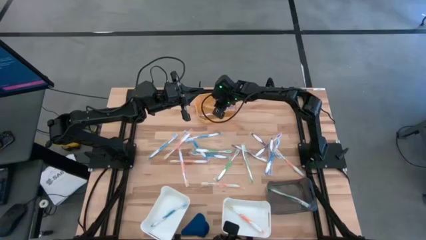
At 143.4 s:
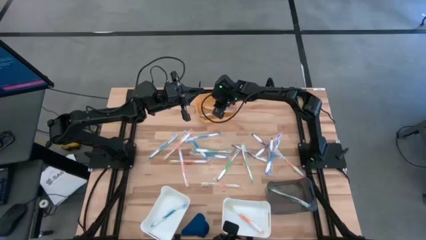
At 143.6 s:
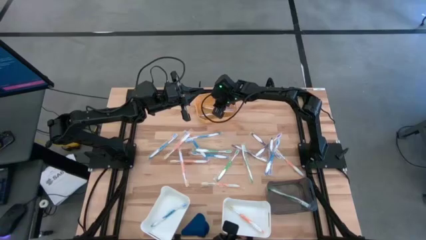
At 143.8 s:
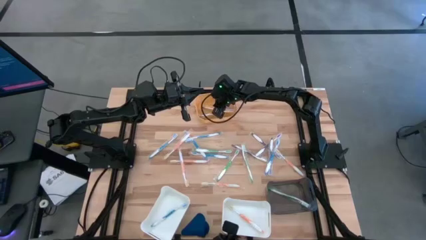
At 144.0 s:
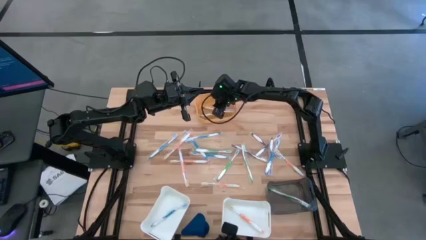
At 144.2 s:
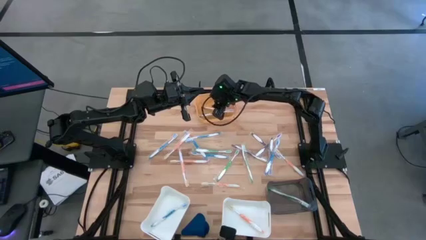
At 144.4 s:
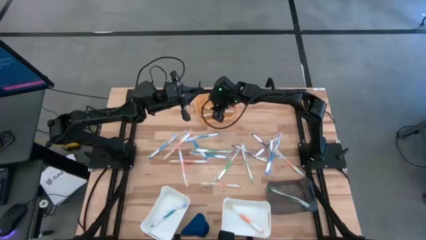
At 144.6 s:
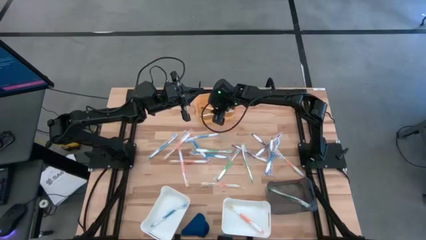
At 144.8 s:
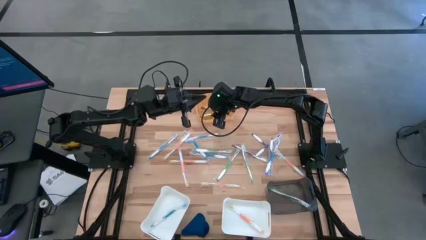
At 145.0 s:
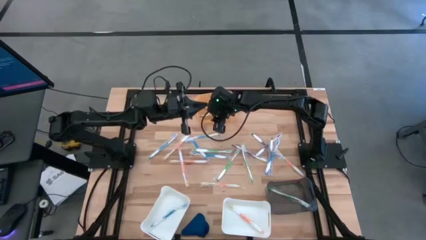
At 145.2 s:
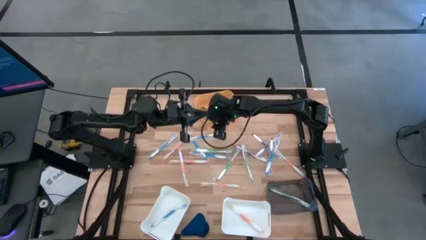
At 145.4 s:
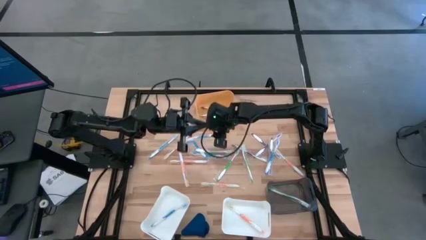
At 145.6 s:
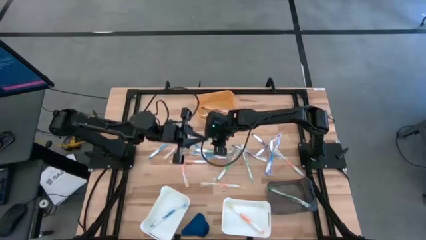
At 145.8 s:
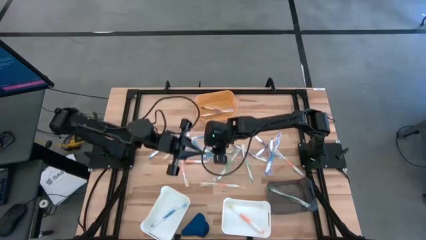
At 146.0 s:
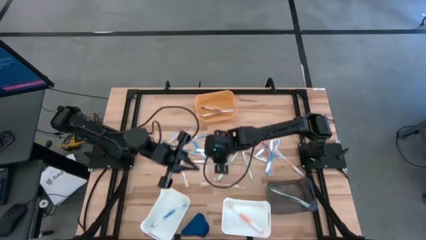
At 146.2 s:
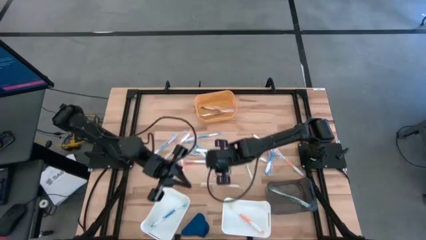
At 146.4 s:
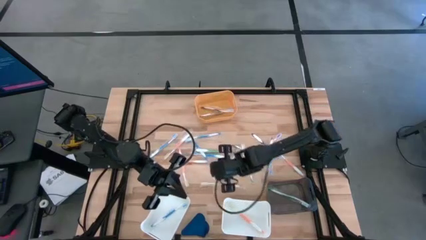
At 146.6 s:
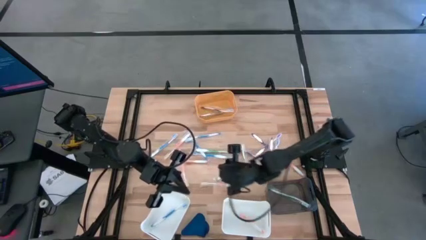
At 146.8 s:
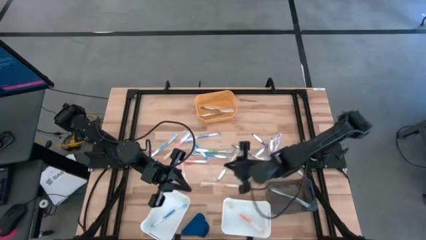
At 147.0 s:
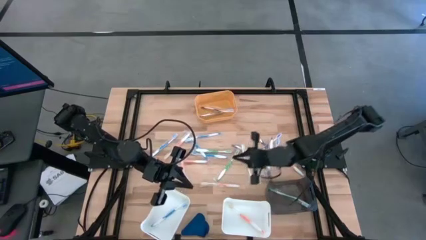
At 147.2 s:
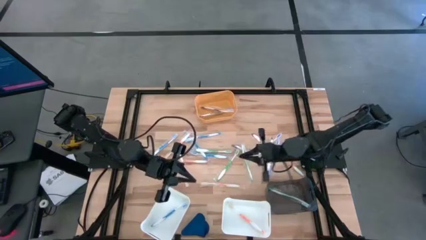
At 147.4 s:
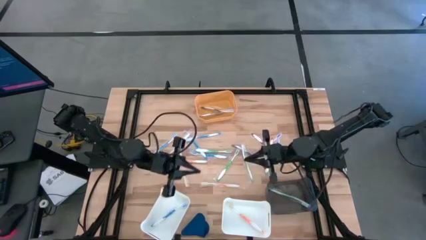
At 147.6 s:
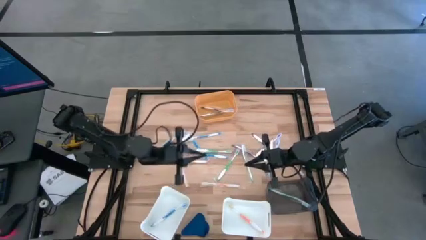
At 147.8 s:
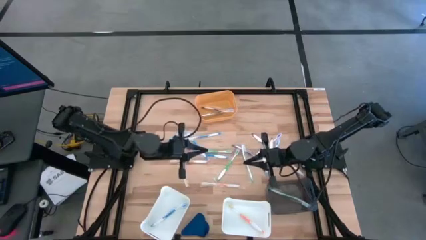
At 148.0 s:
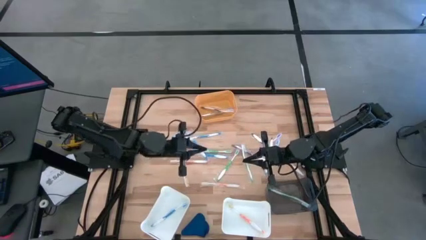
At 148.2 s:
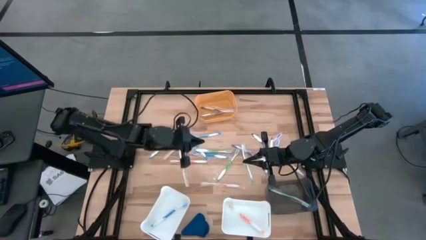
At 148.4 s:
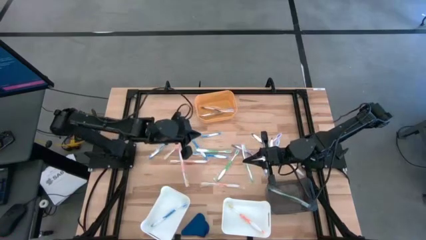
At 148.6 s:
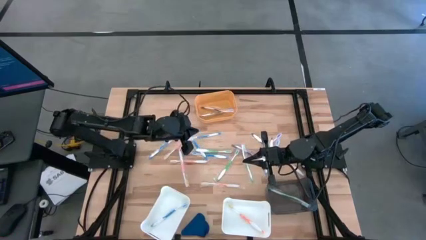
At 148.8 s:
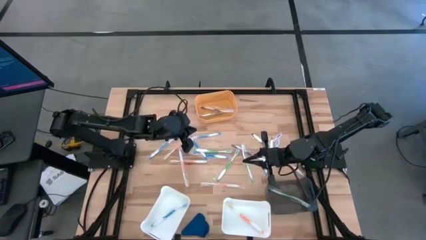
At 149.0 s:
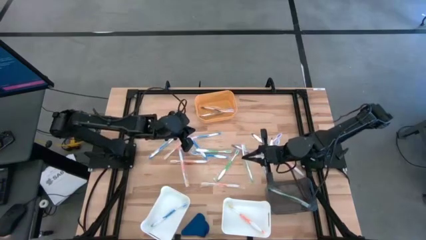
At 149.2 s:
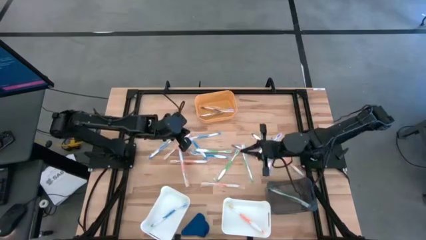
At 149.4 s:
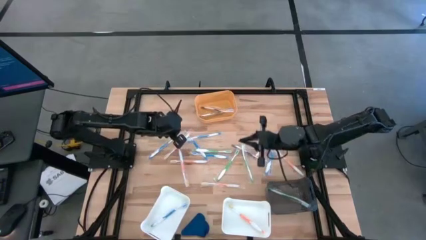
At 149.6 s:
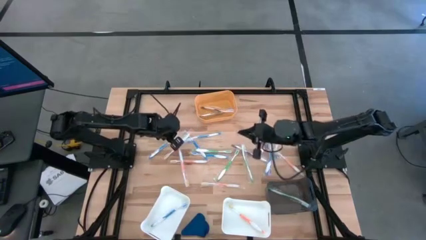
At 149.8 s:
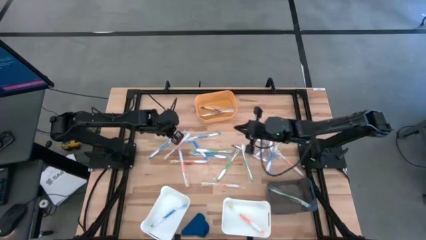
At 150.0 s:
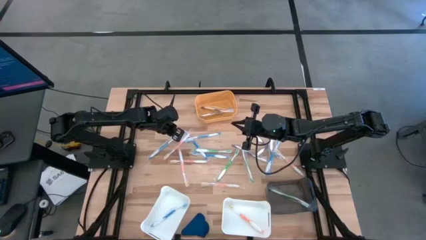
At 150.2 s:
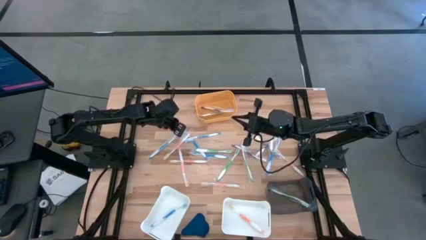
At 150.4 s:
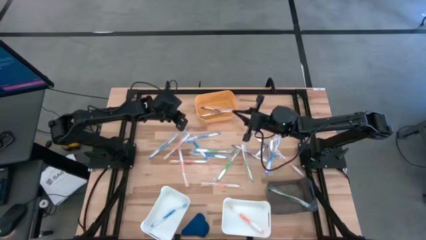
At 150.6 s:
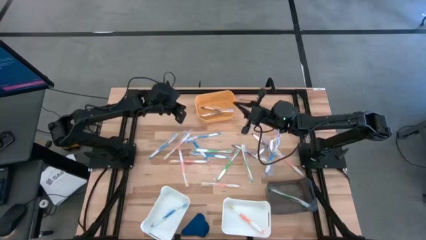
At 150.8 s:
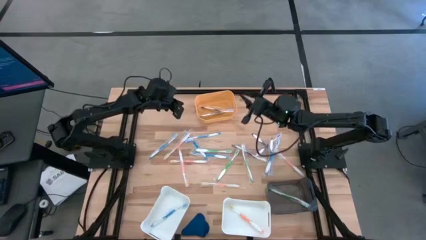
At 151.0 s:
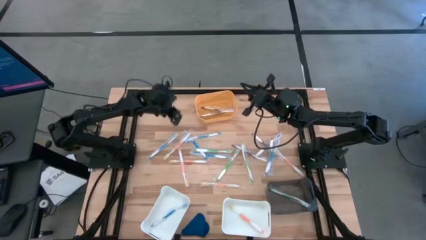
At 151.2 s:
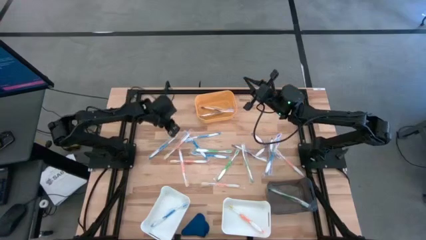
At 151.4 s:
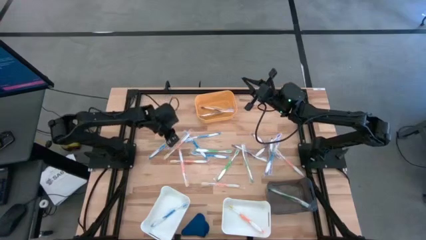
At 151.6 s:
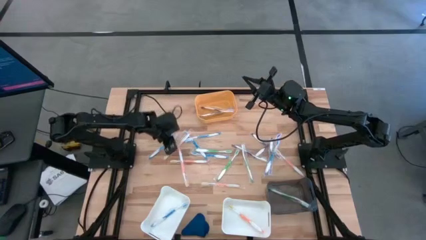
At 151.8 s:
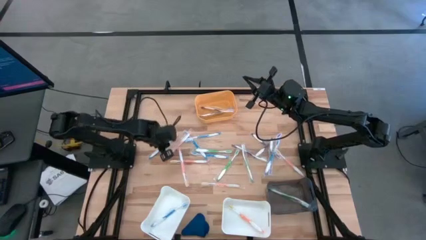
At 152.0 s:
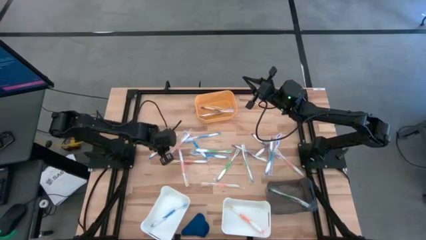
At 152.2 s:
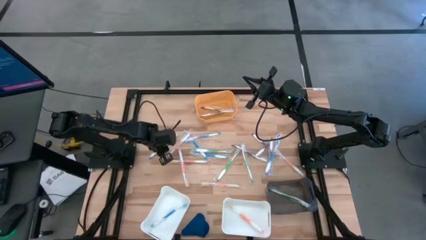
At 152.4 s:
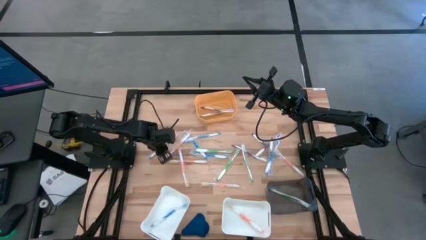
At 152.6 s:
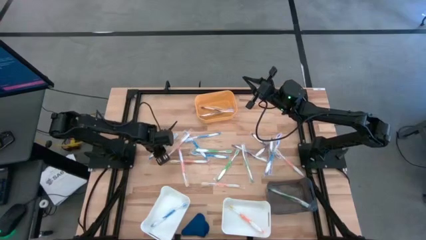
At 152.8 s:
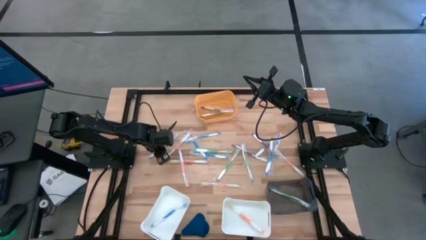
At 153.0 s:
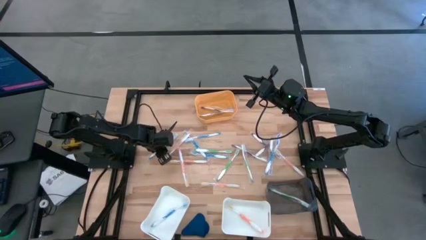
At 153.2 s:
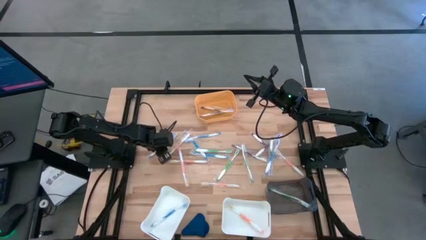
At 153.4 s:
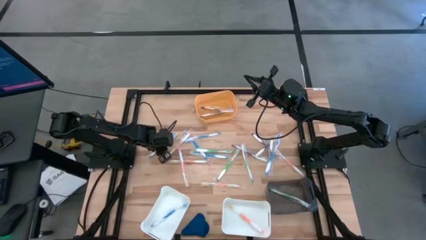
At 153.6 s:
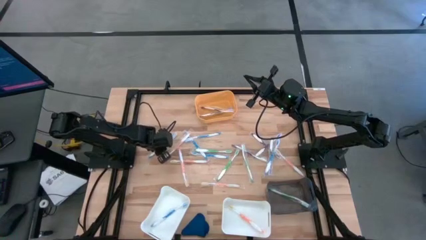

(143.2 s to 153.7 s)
Task: Pick & Place Toothbrushes
Put the blue toothbrush into the left white bin

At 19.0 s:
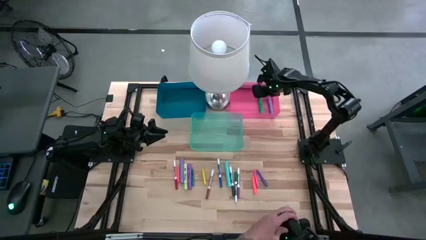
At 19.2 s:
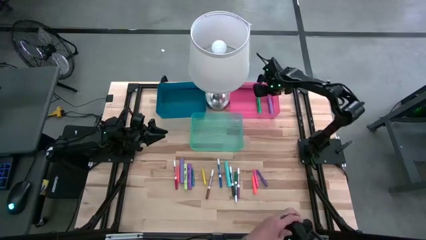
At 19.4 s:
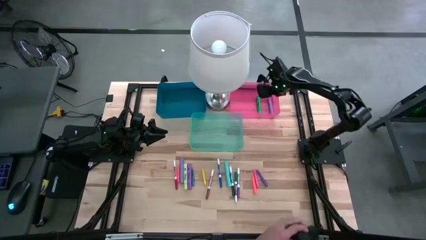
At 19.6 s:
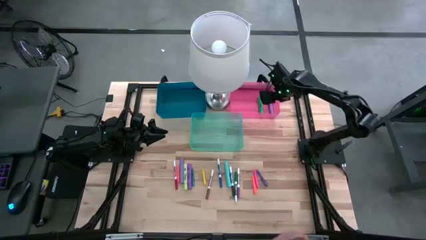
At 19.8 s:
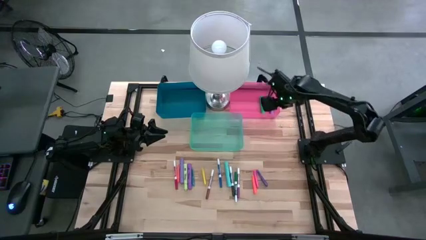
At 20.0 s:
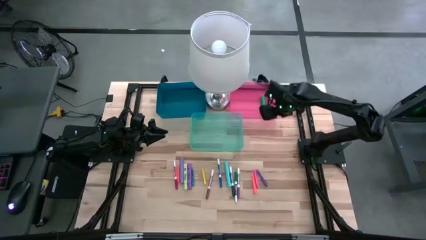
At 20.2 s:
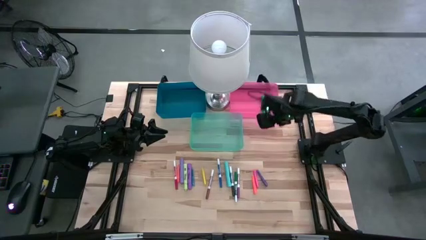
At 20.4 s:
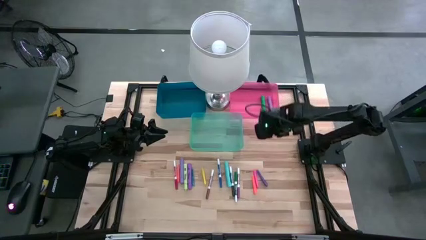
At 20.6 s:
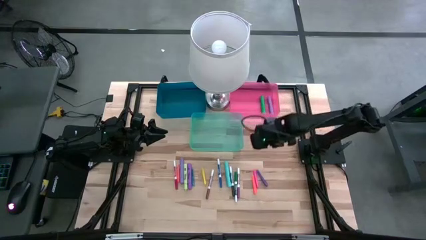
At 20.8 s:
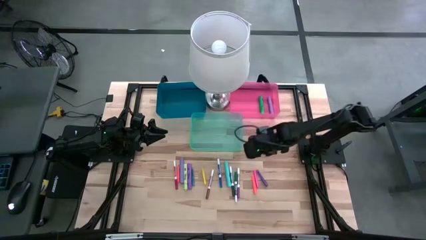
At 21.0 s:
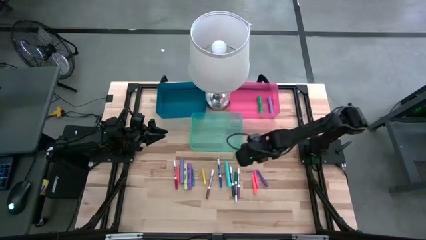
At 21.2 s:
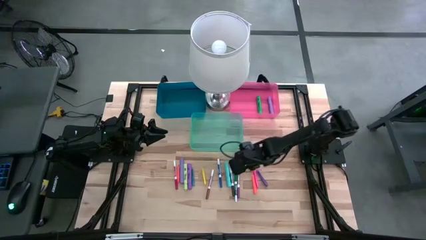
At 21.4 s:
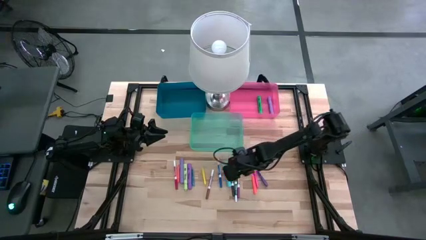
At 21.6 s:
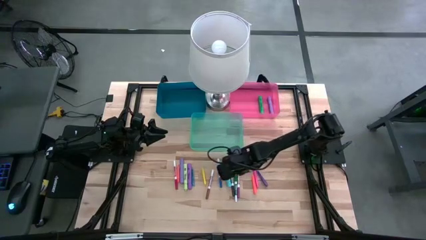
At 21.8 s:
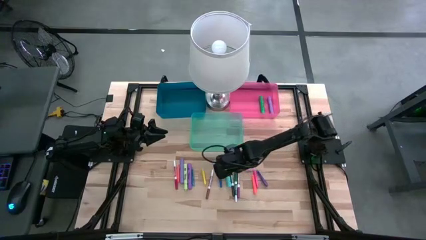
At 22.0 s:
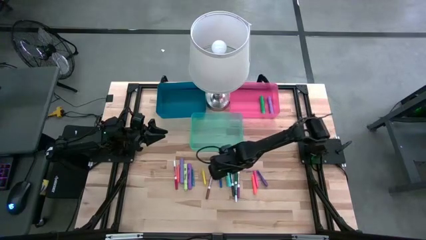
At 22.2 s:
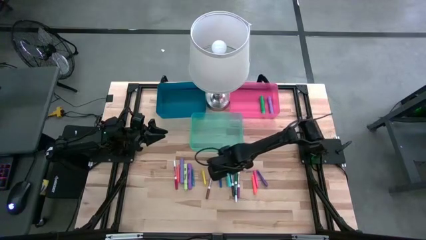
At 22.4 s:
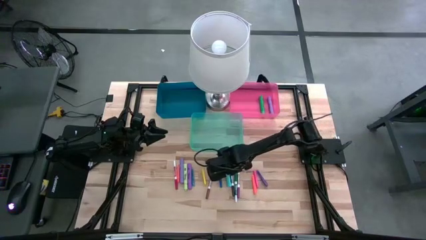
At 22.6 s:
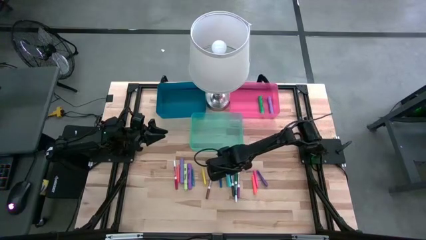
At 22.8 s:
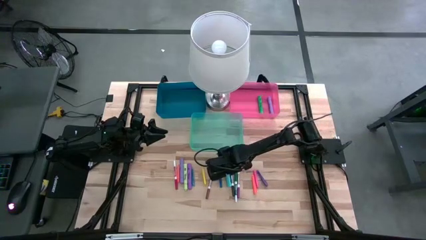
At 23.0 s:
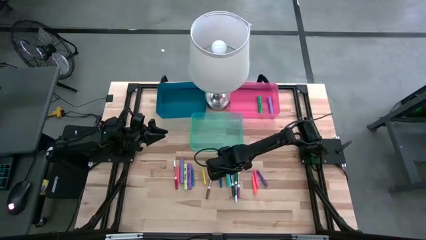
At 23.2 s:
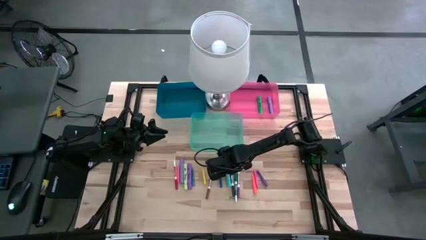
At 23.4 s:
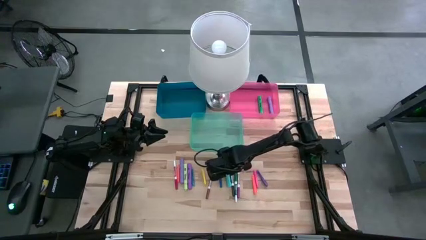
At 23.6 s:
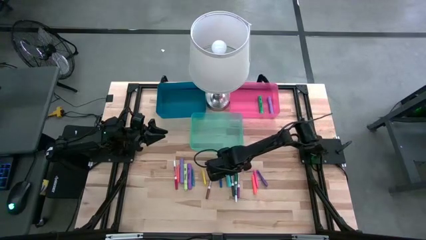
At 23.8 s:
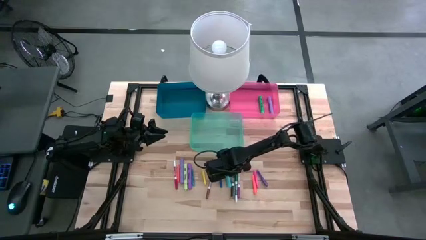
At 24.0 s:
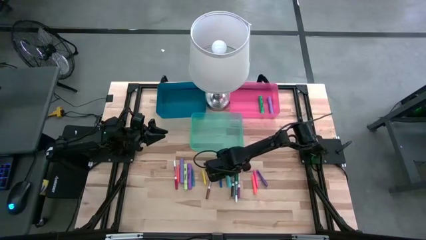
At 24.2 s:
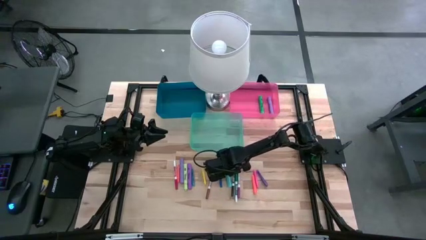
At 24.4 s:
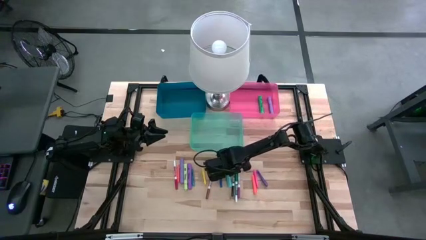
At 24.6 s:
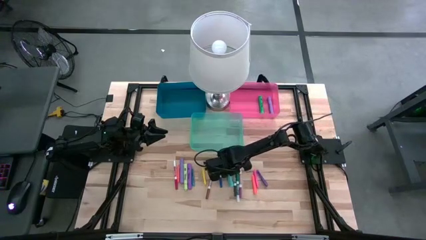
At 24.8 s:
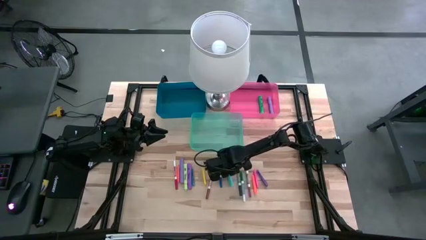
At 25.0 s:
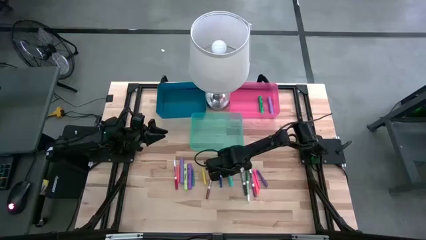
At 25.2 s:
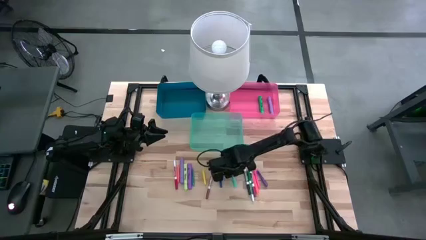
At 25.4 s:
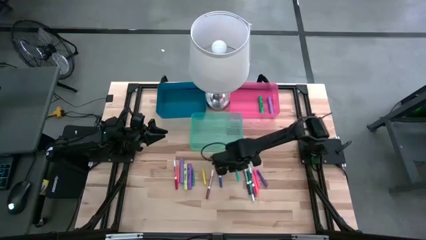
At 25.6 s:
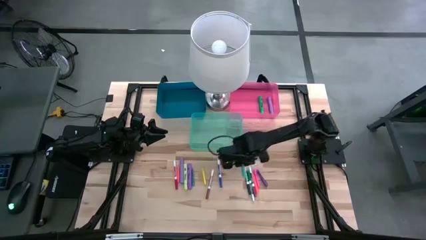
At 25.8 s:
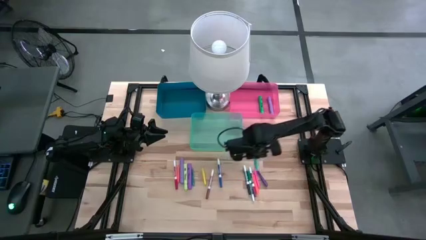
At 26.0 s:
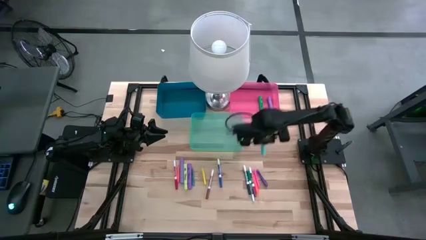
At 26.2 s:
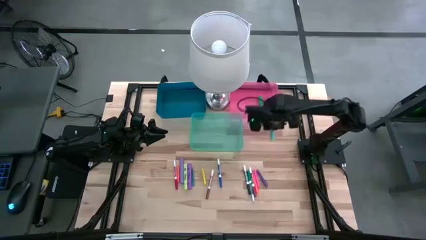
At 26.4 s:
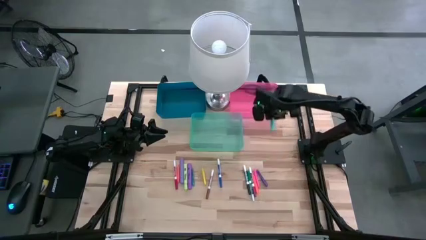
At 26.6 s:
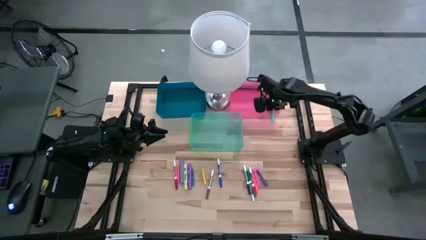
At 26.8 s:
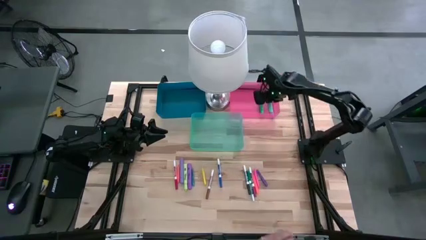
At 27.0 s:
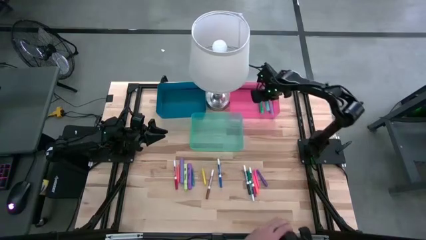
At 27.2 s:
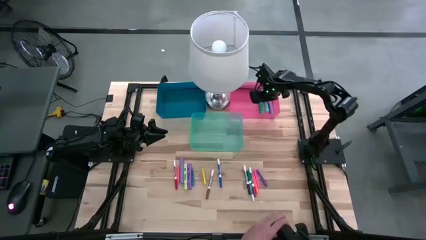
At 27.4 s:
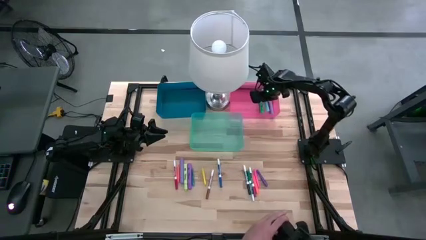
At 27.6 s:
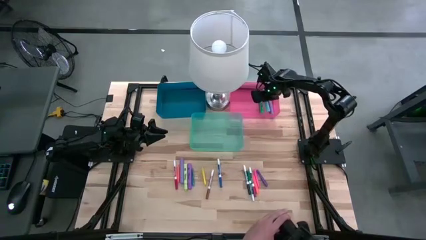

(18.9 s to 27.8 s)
Task: Pick & Place Markers
Put the light blue highlighter pen into the red bin
